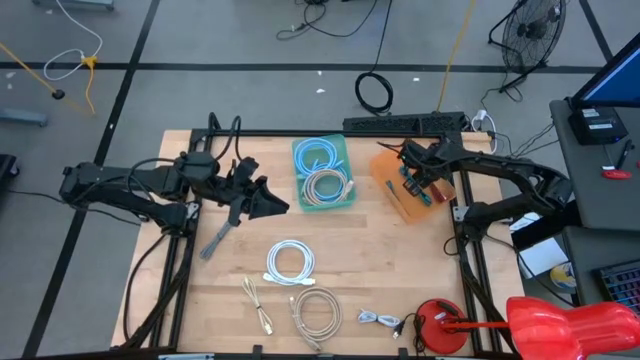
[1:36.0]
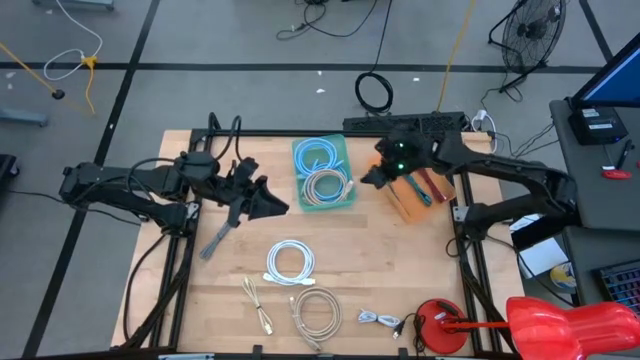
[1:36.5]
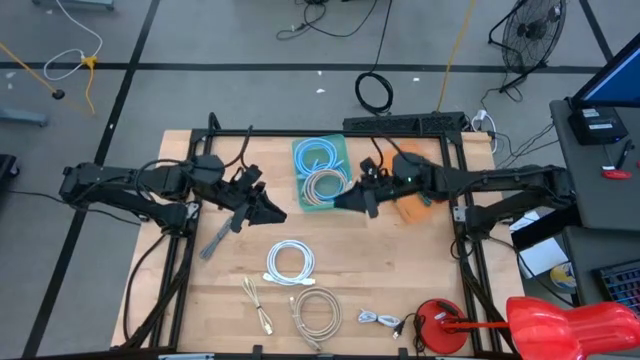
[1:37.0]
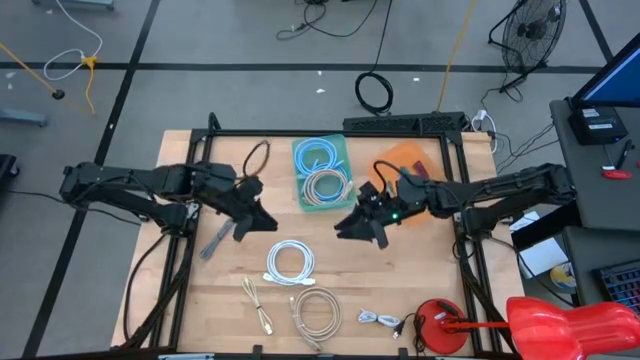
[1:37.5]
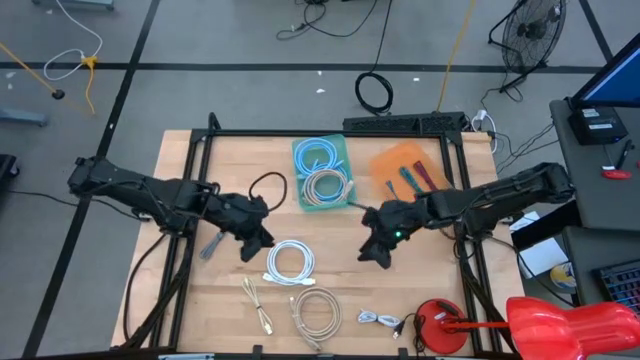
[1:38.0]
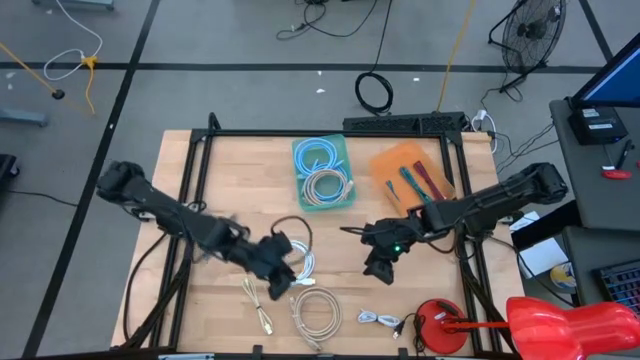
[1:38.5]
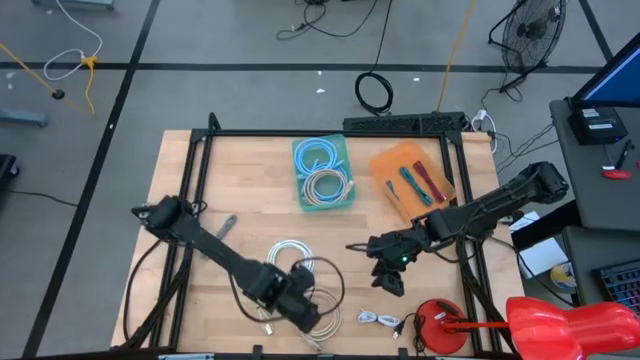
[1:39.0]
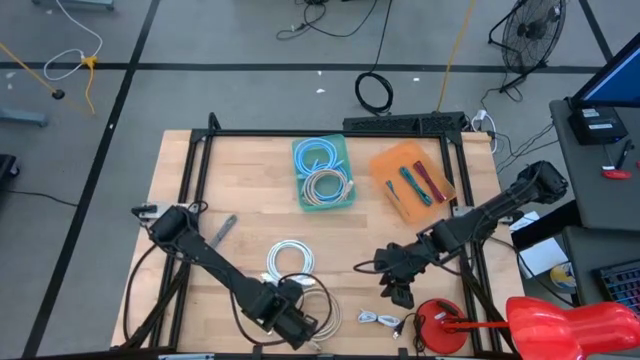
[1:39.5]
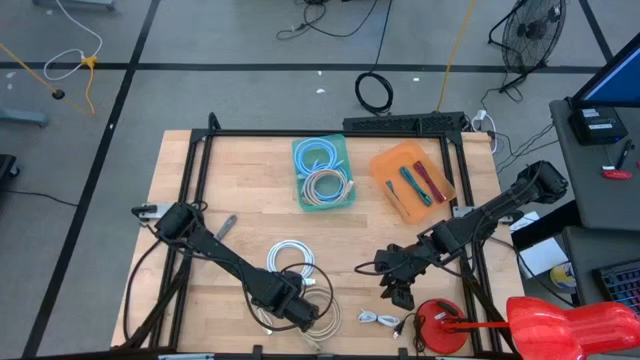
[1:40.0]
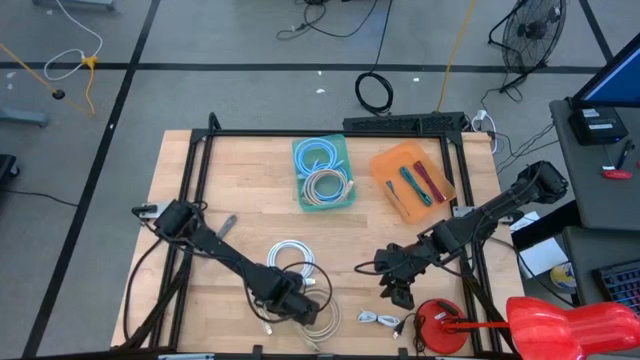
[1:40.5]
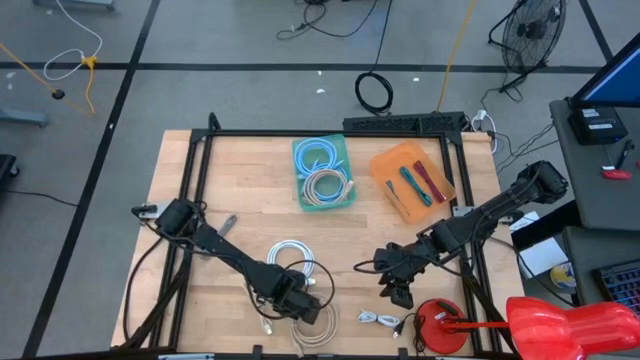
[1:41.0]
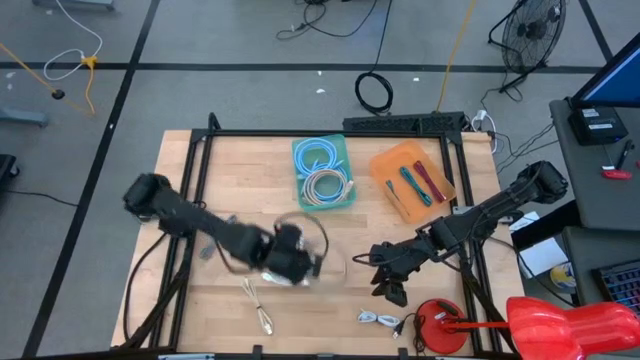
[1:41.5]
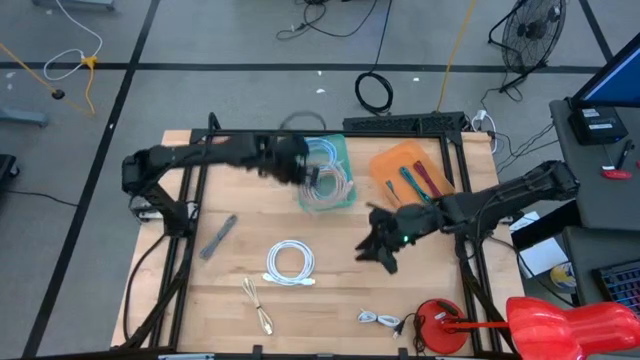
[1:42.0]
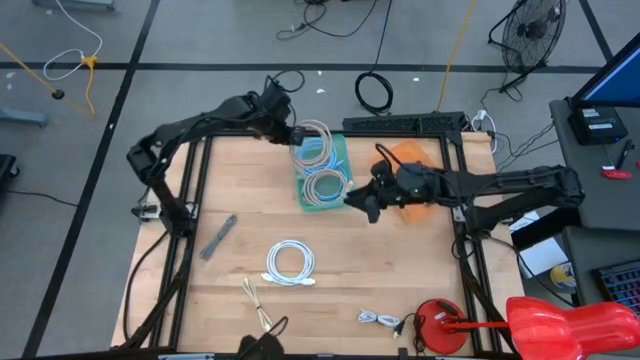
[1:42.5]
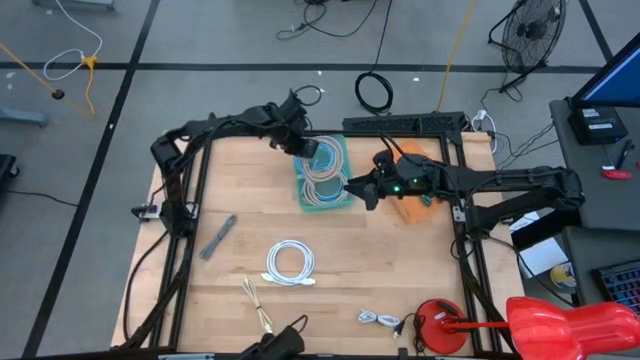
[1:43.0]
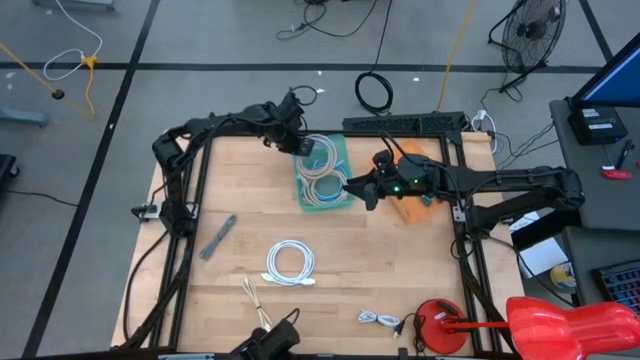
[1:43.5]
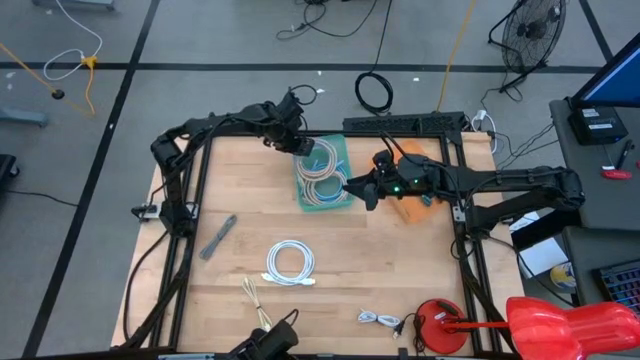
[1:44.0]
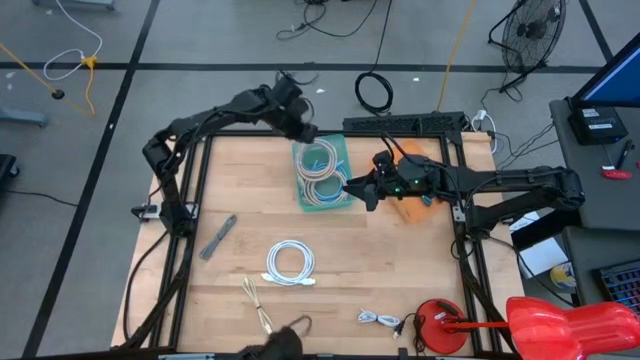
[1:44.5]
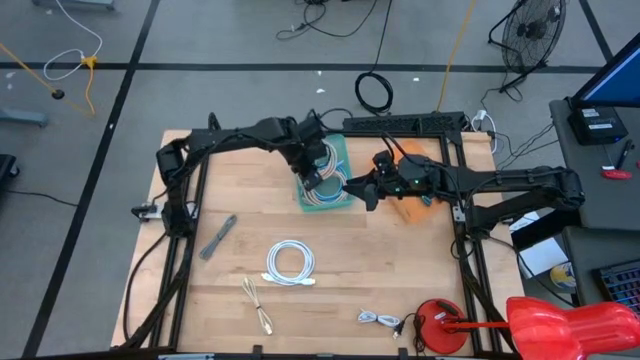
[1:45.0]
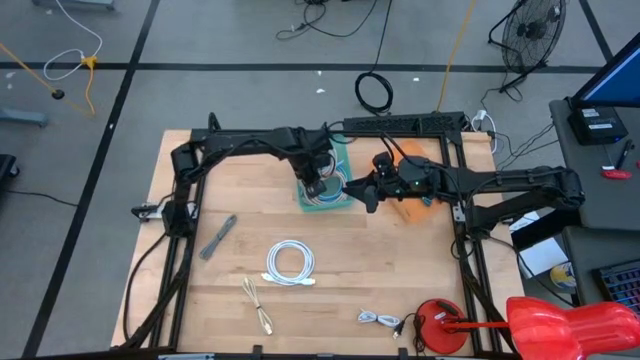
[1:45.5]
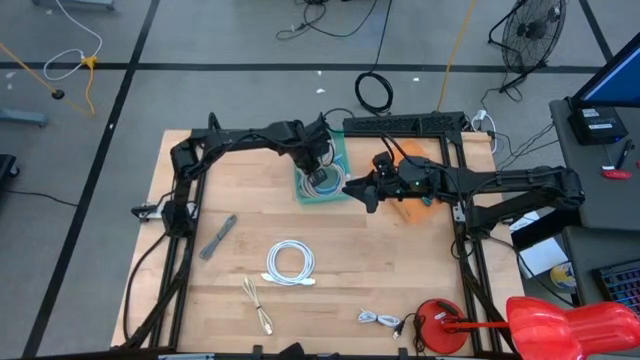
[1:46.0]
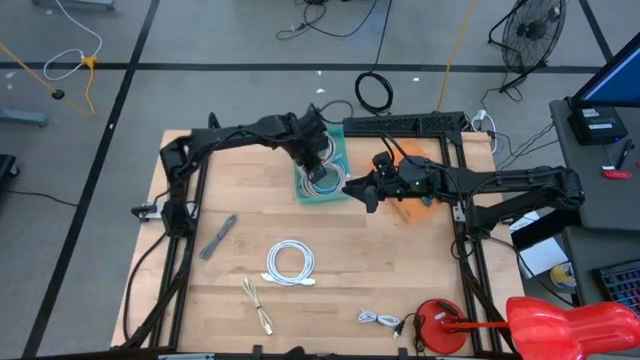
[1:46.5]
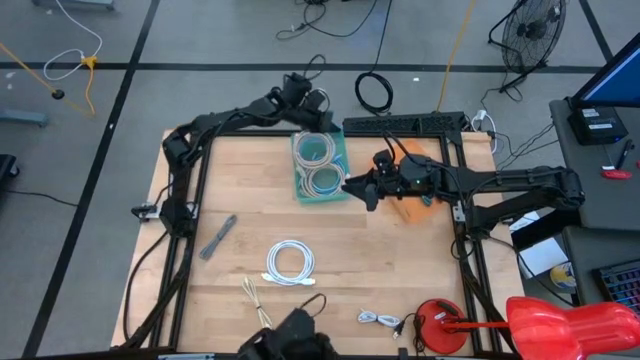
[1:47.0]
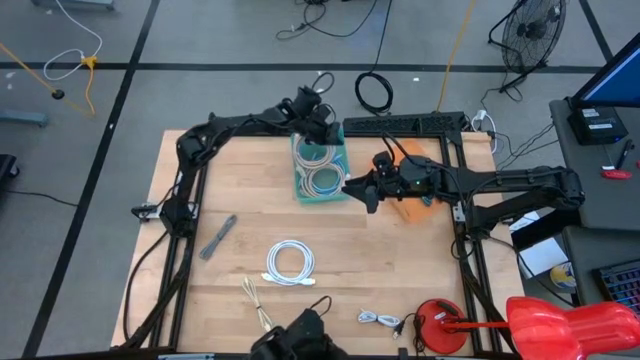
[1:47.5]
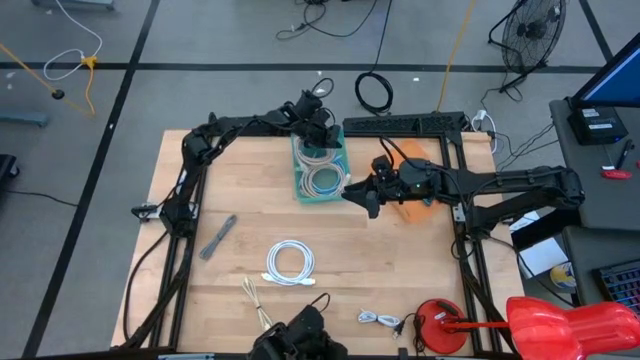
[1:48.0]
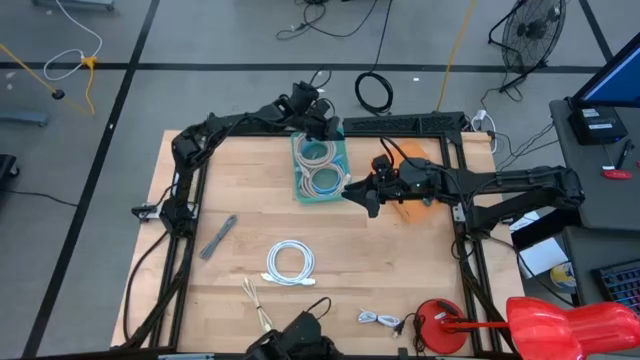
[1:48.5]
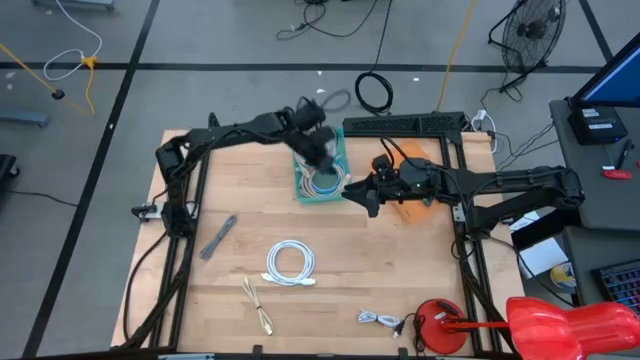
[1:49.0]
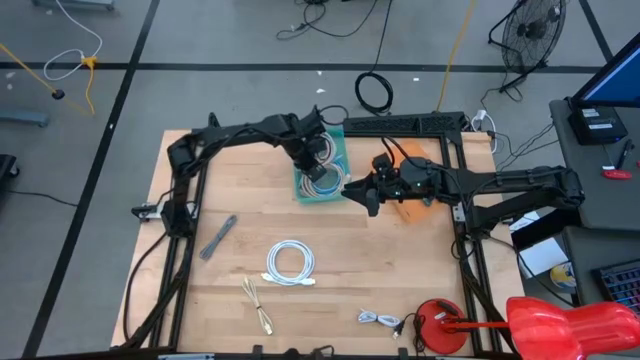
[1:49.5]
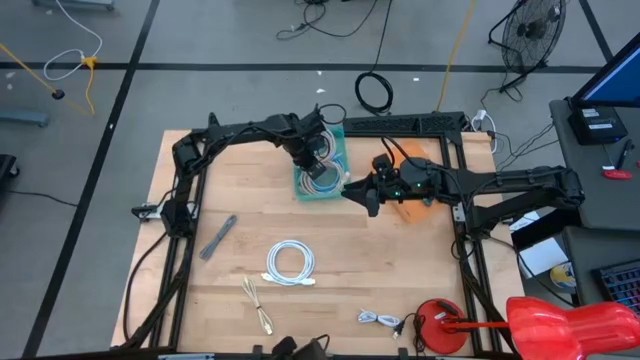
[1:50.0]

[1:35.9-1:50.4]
Task: Pick & Place USB Port
Put the right brown charger cable into the green bin

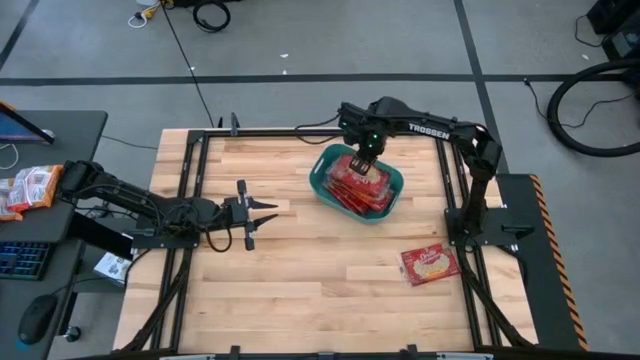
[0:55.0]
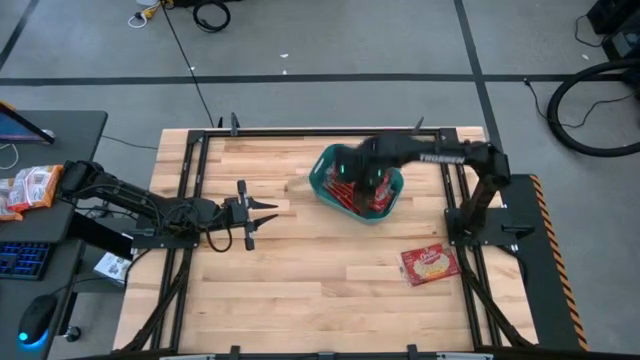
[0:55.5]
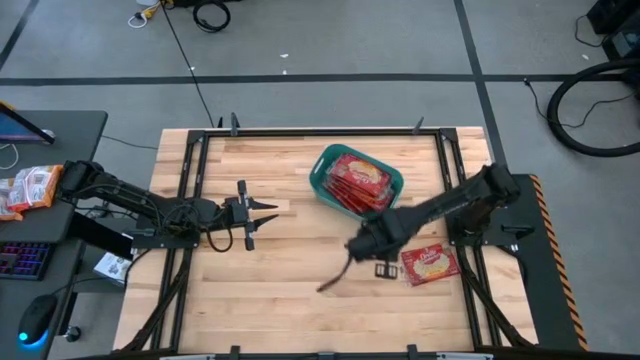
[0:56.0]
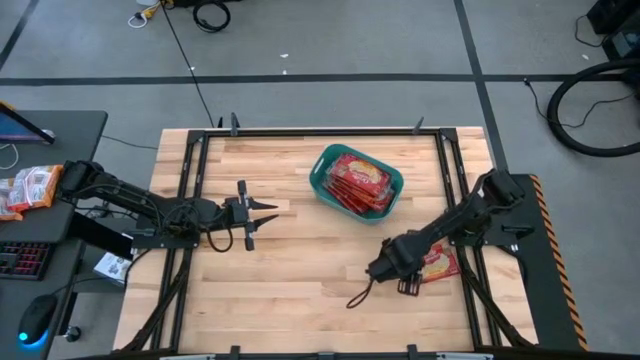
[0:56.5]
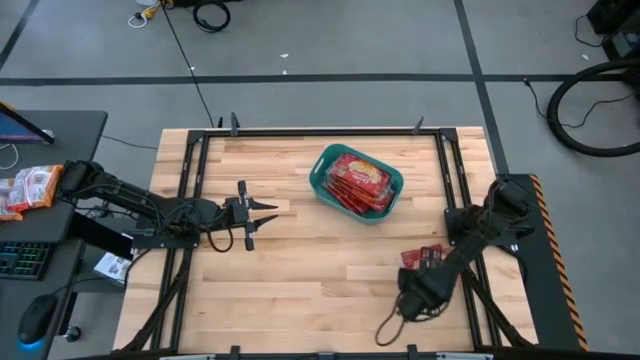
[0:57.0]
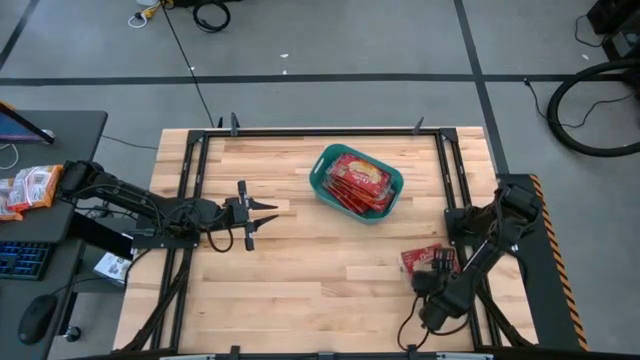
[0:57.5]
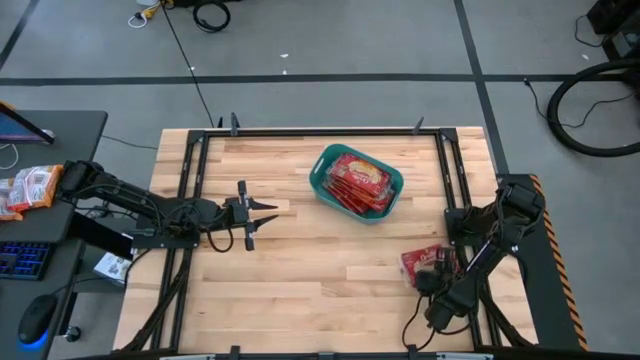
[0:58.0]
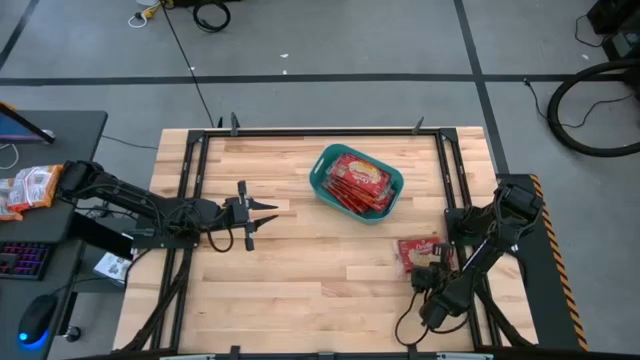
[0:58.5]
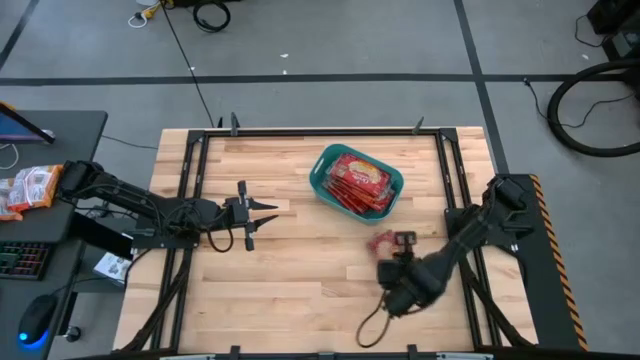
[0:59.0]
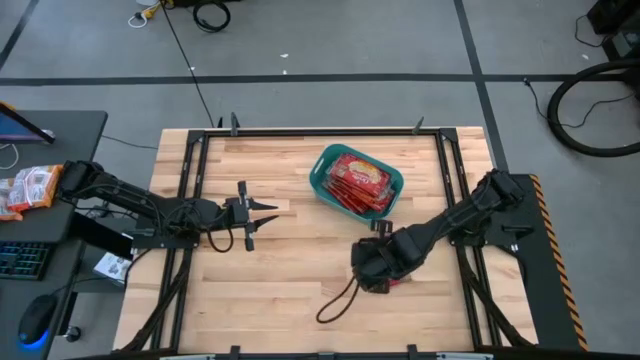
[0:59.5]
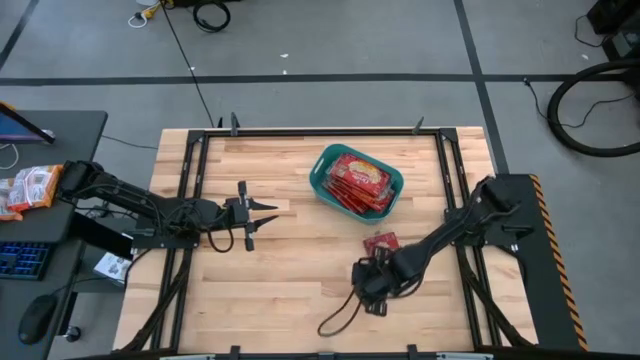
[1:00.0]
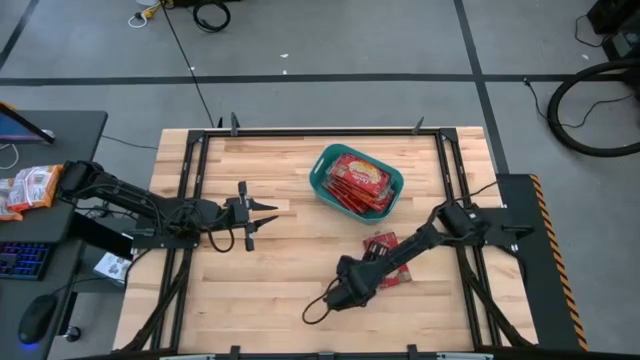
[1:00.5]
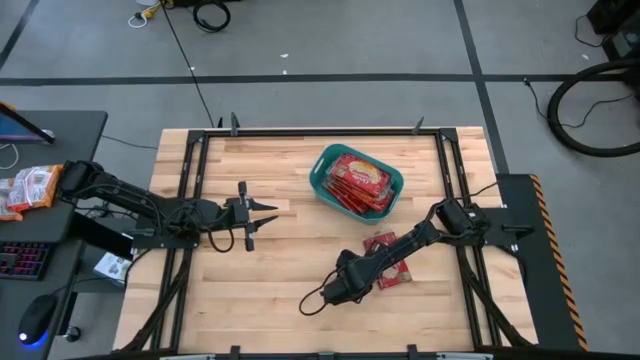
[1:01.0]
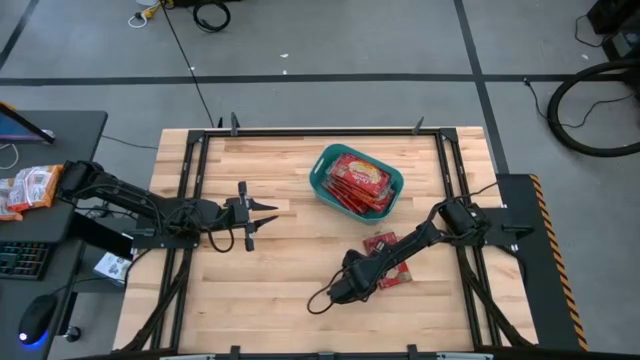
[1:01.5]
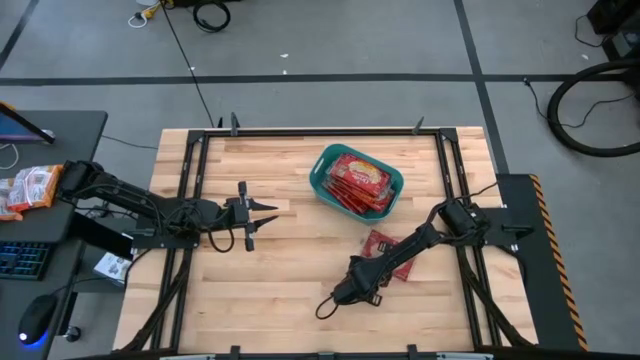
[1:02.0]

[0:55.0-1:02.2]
Task: Sort popcorn bags into baskets
Put the red popcorn bag into the green bin
